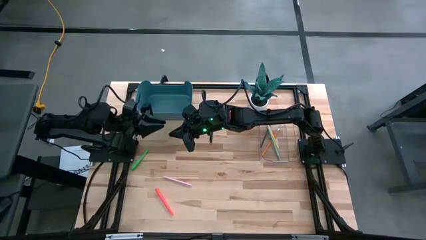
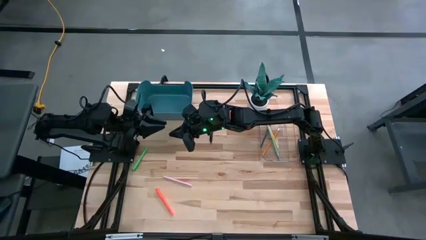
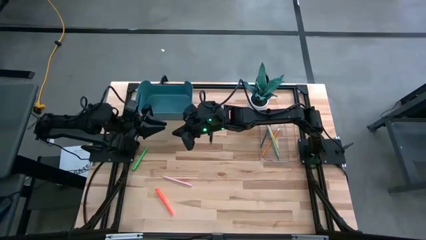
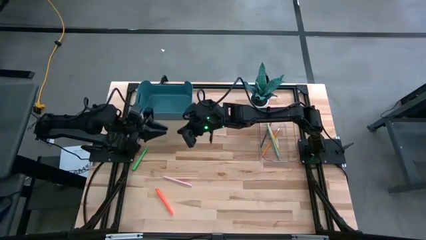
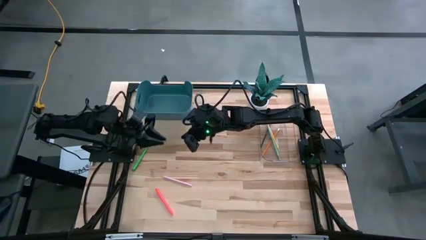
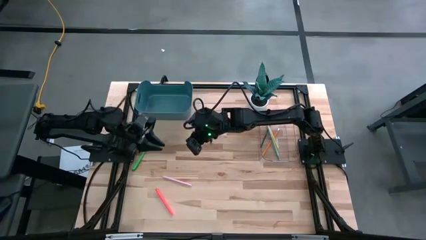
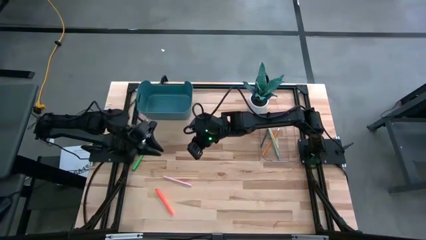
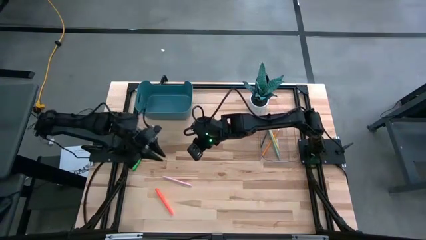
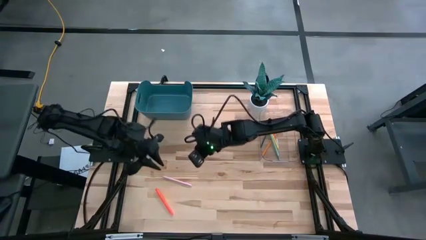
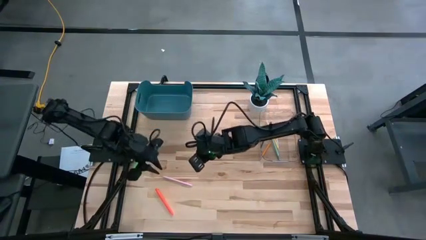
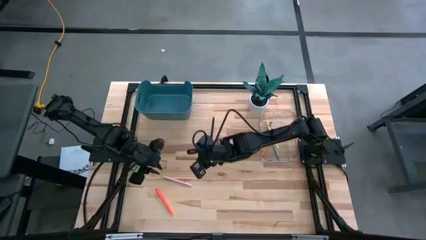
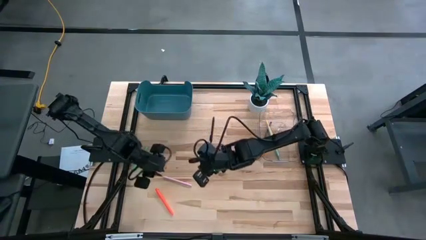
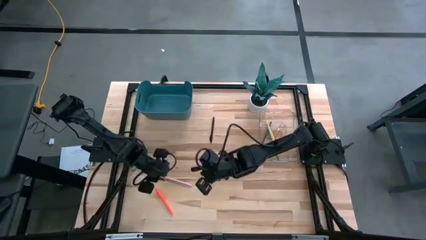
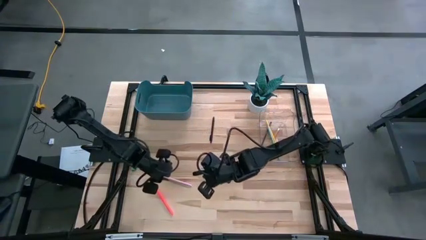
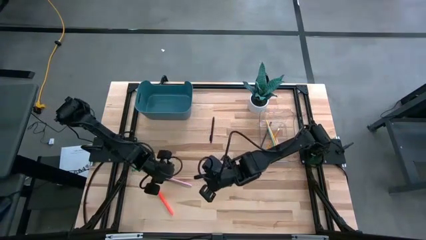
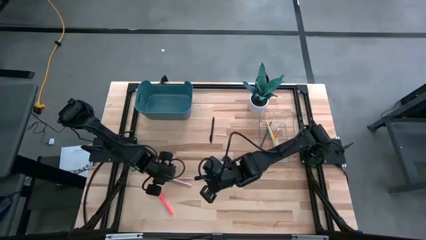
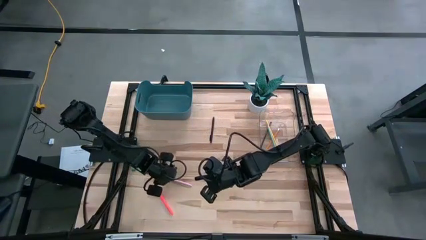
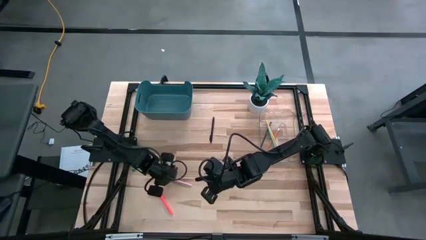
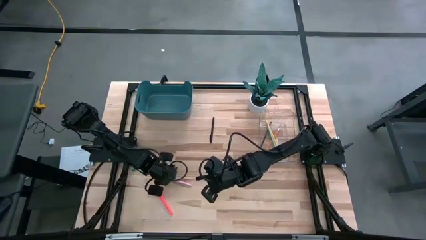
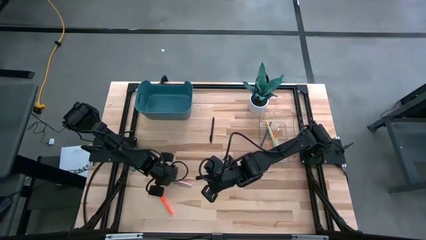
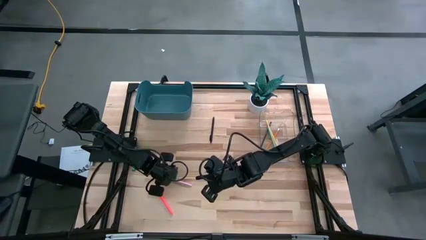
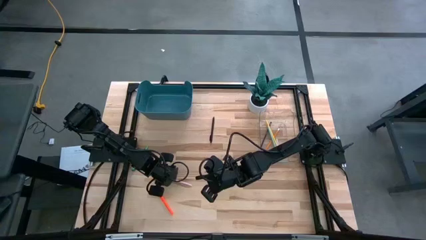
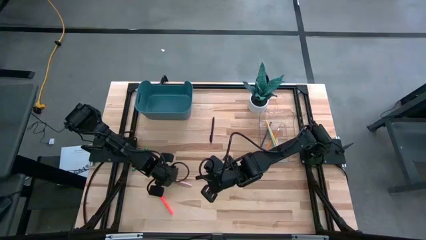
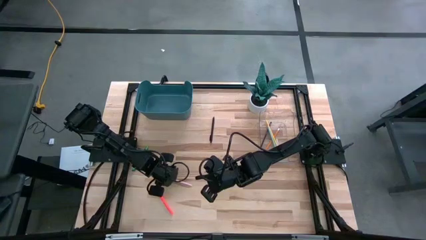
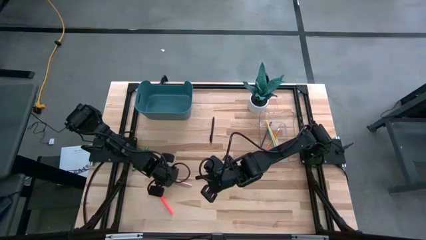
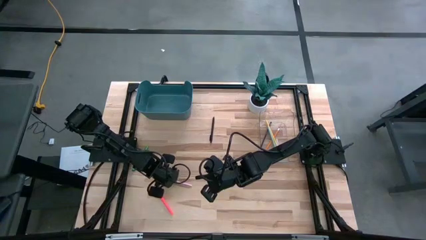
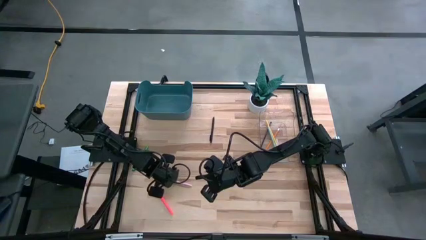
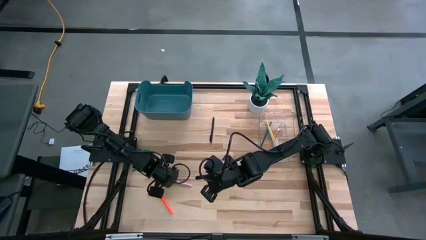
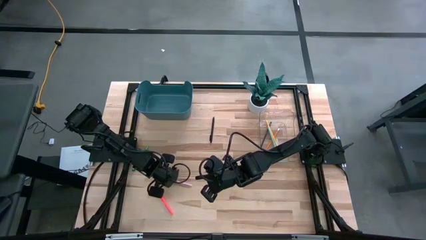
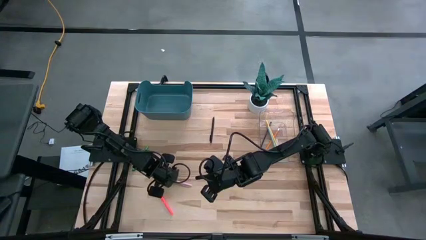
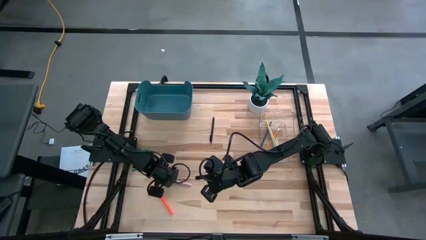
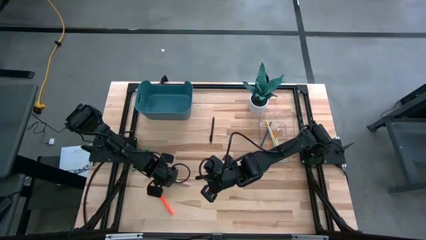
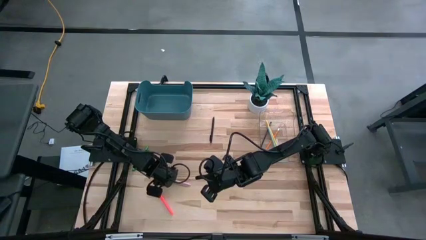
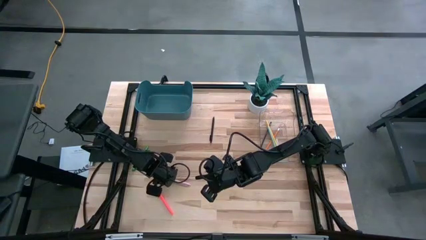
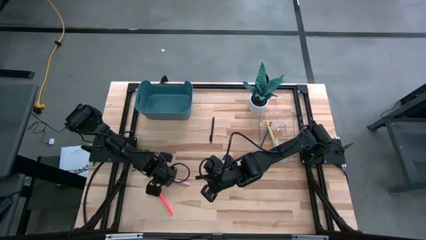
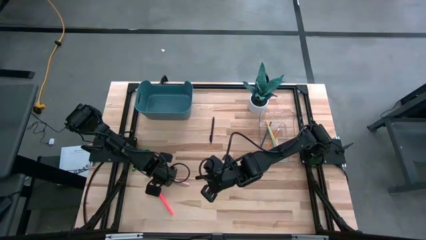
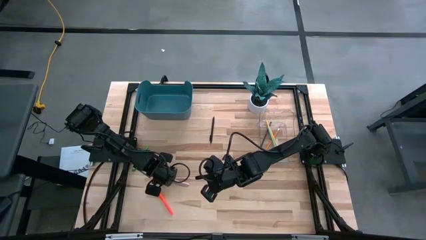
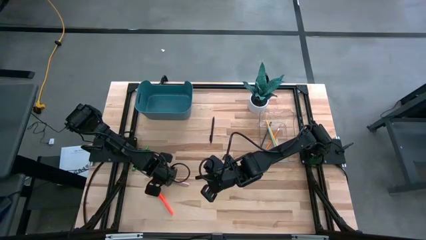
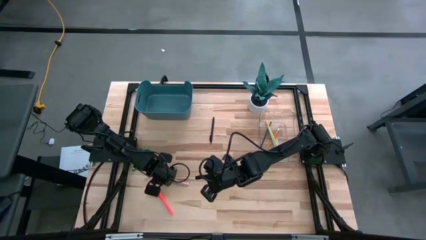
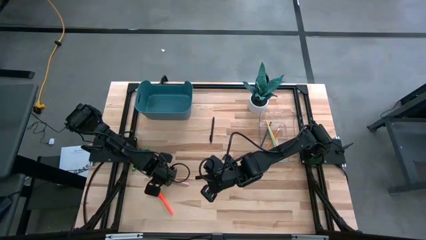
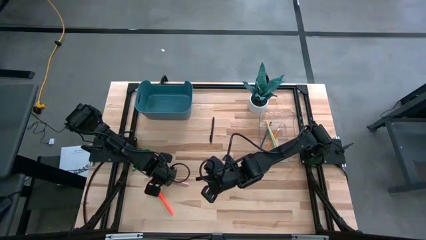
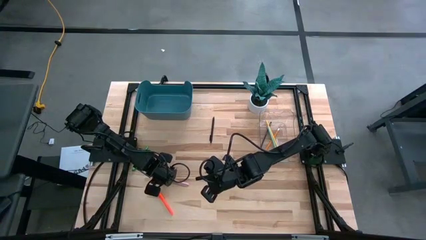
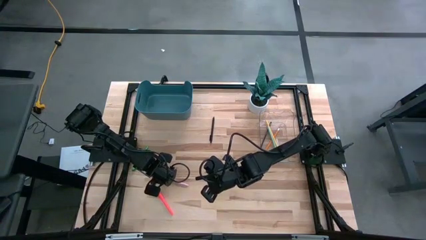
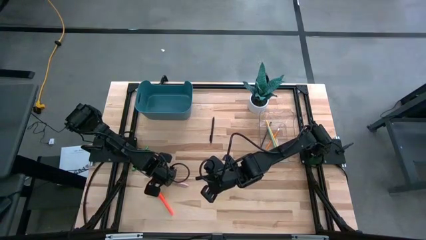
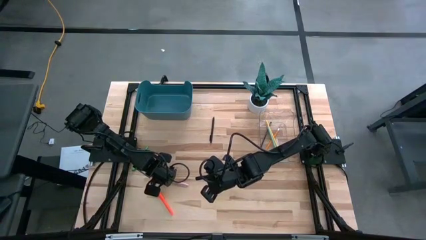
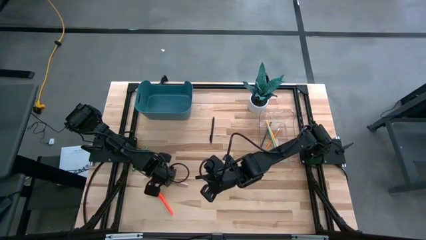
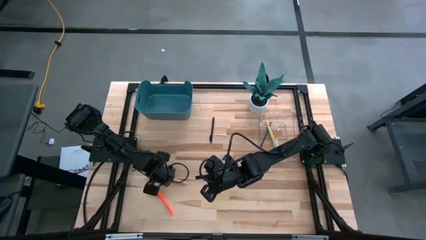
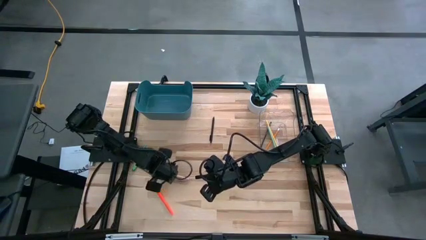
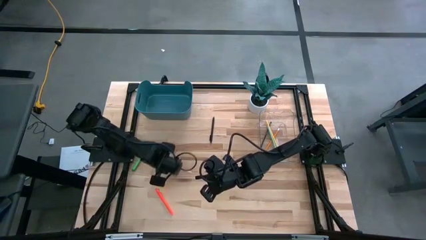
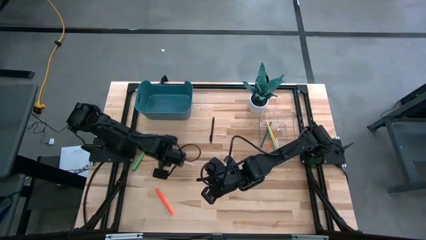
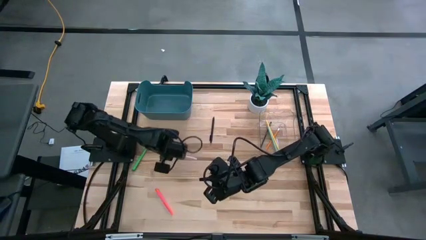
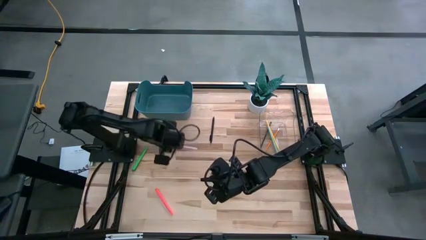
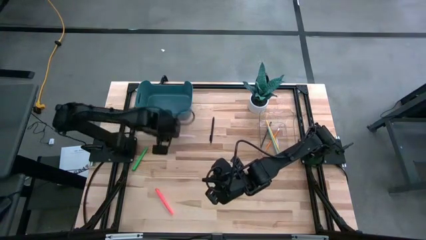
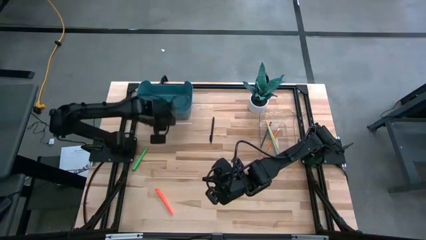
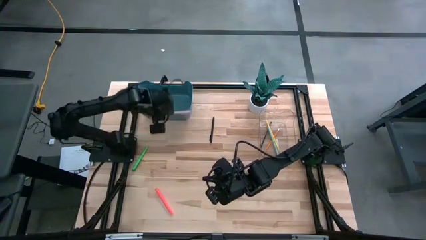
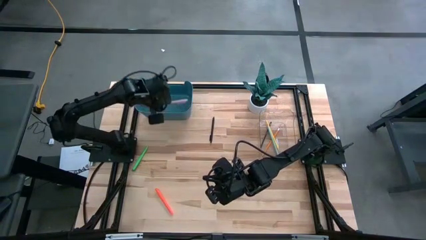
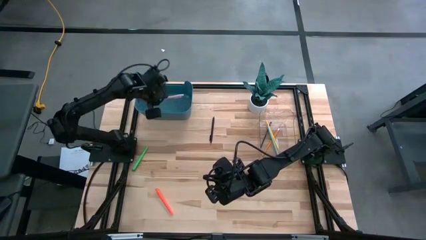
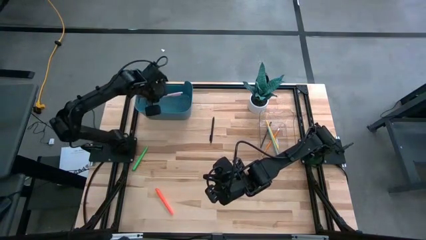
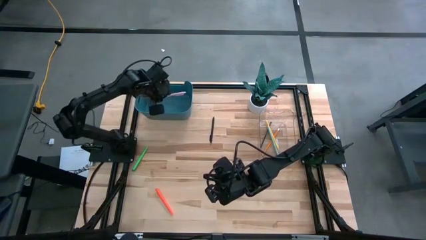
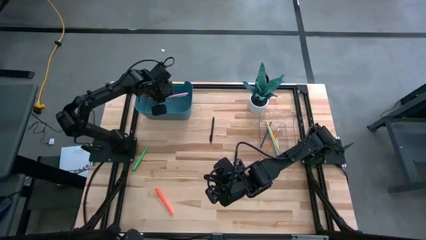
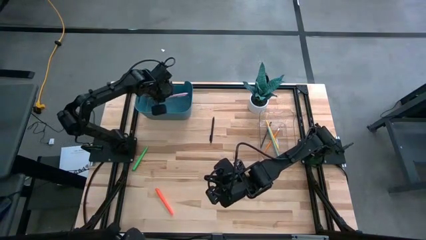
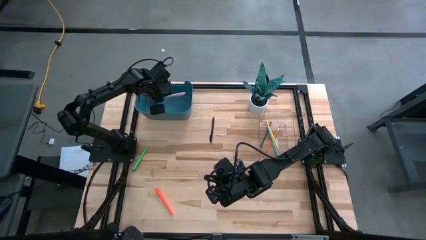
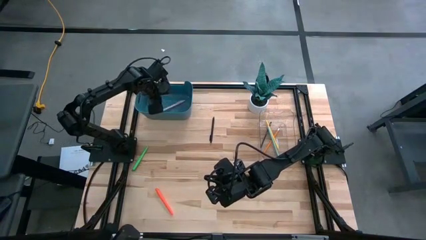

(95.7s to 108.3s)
Task: Sort pens & pencils
Put the pink pen into the blue bin

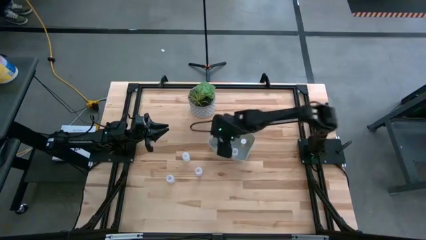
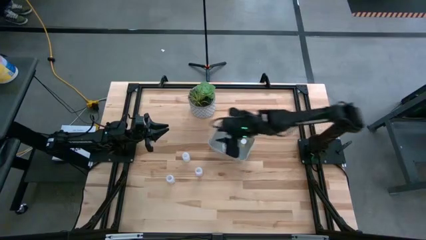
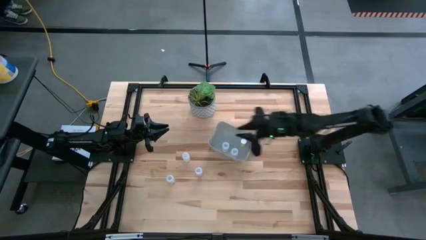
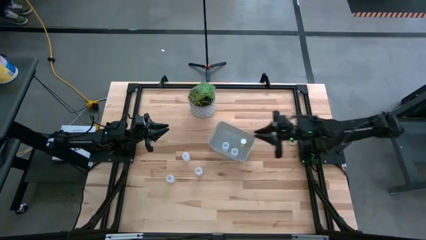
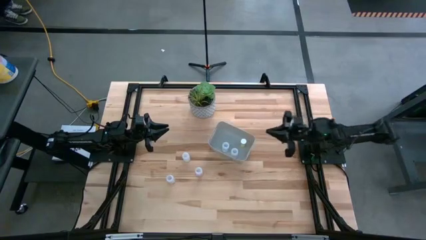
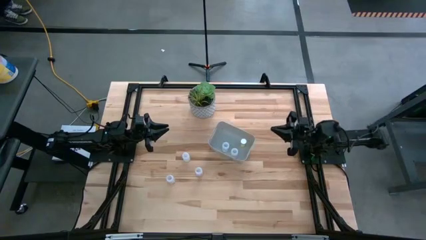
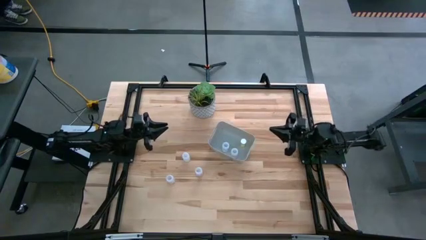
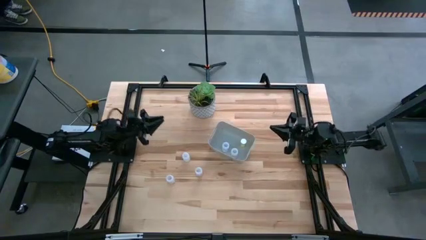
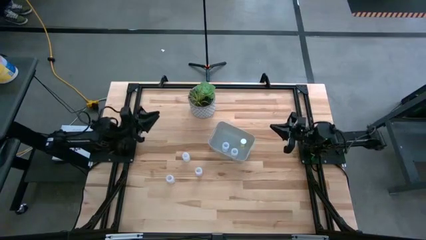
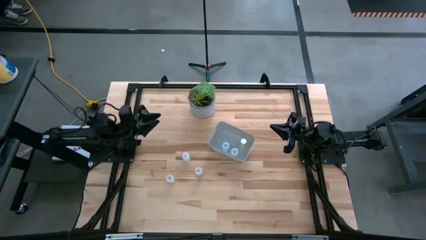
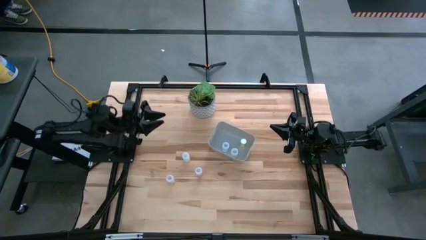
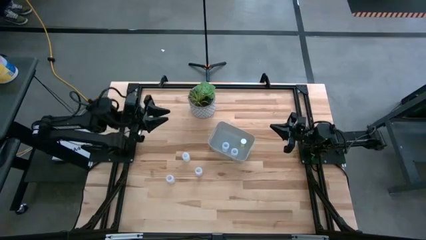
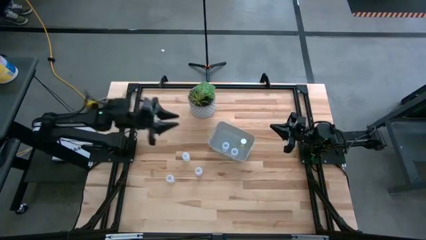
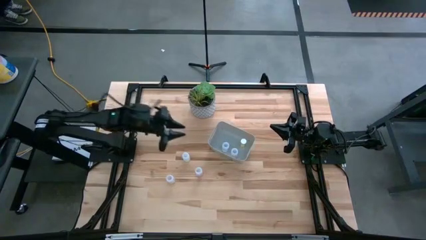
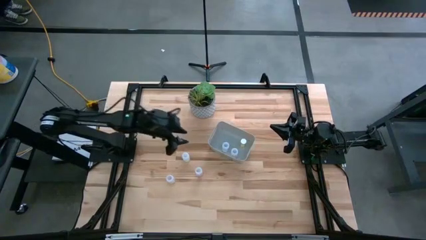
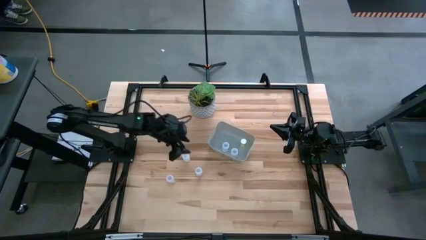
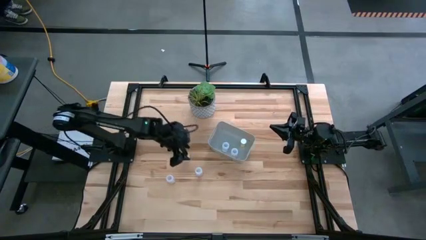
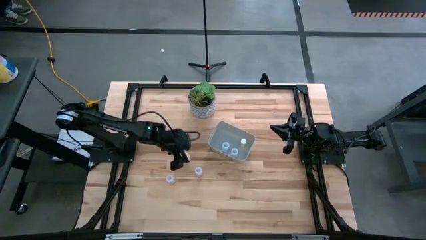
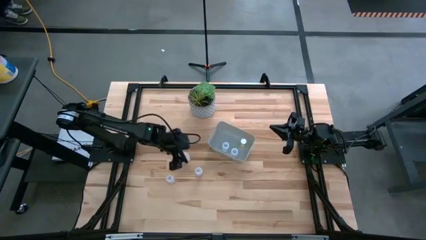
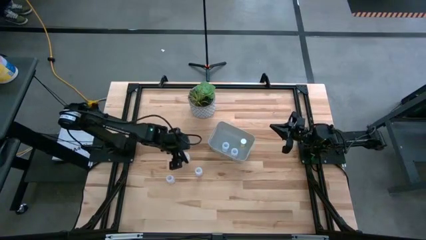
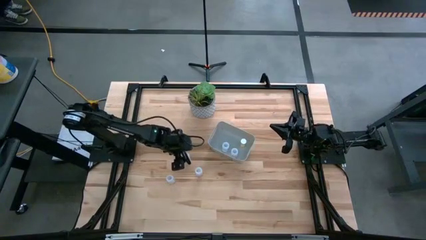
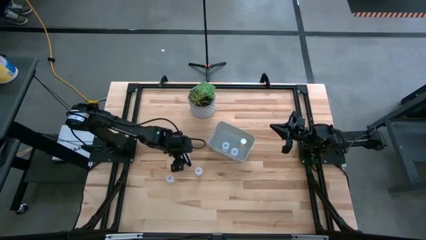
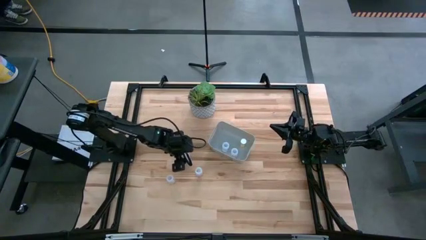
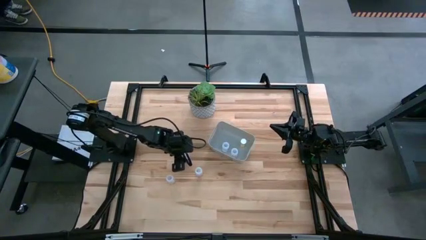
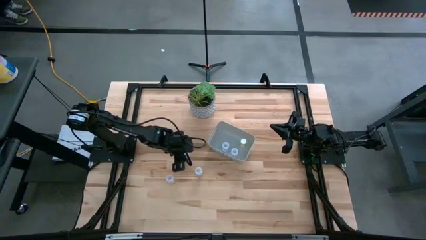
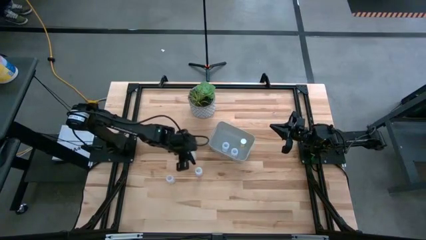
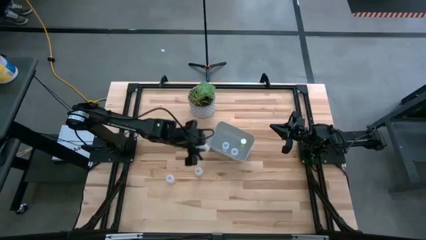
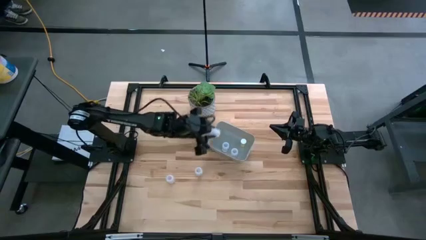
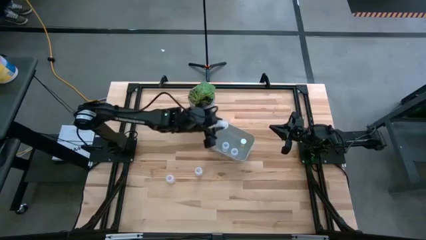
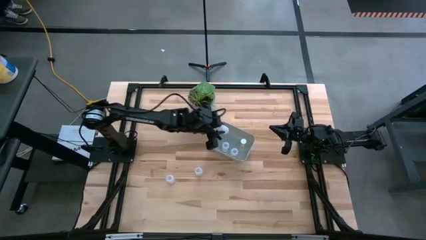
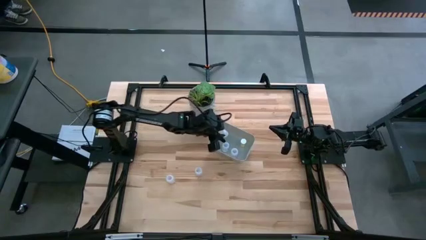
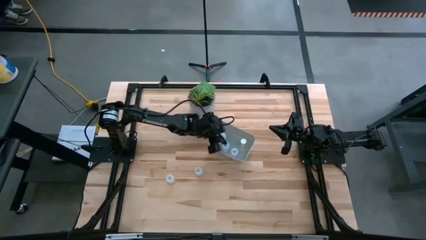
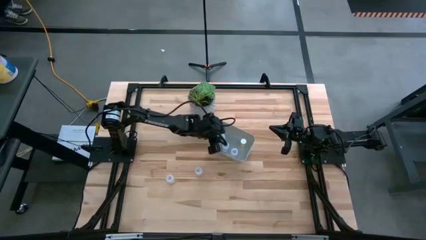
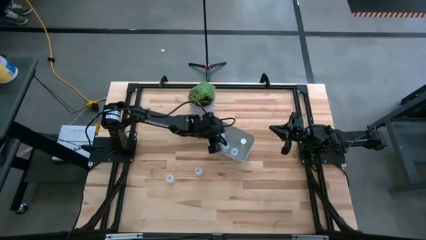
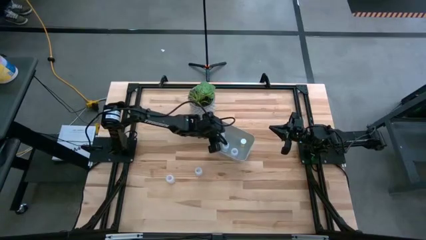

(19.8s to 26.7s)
Task: Pick and place pill bottles into a basket
Put the white pill bottle into the white bin
